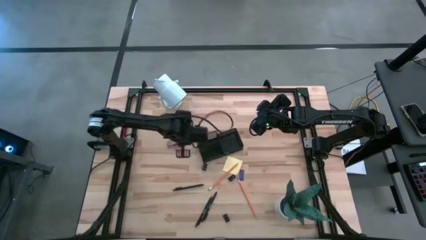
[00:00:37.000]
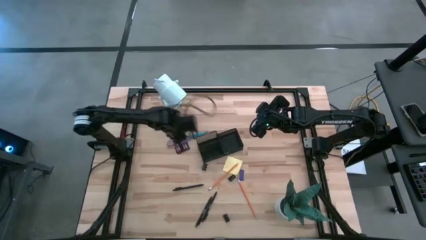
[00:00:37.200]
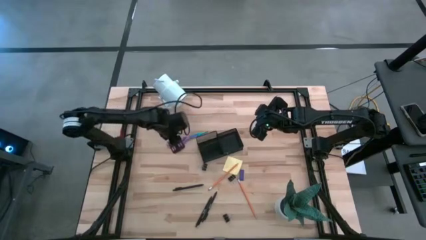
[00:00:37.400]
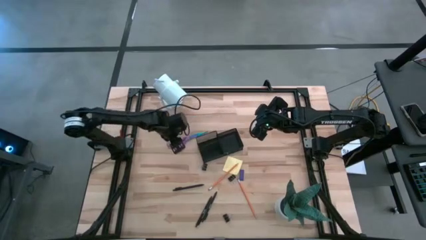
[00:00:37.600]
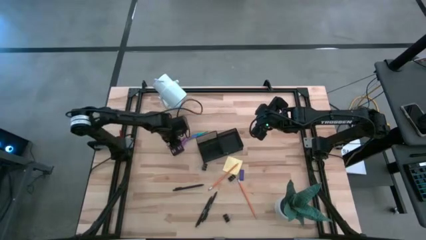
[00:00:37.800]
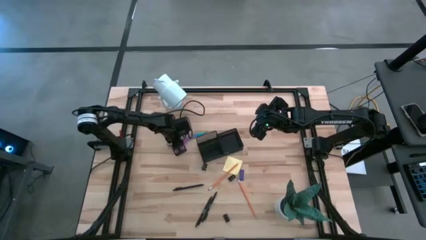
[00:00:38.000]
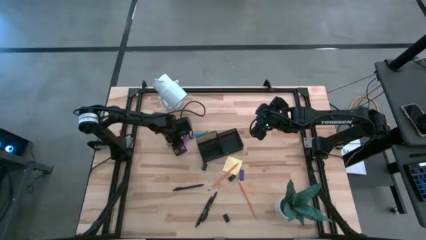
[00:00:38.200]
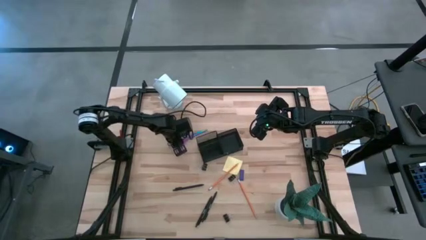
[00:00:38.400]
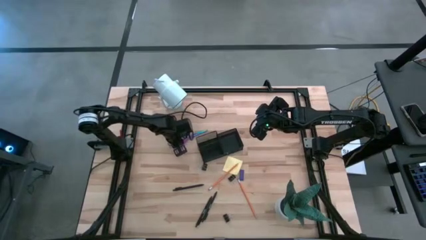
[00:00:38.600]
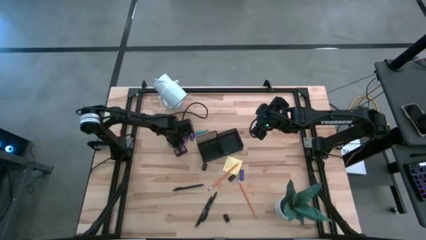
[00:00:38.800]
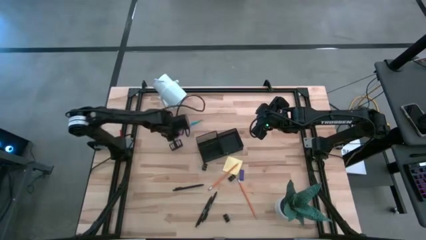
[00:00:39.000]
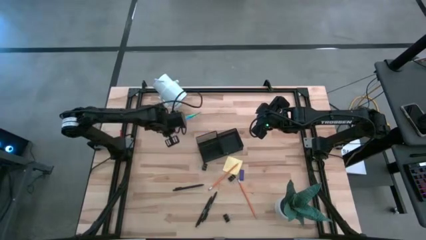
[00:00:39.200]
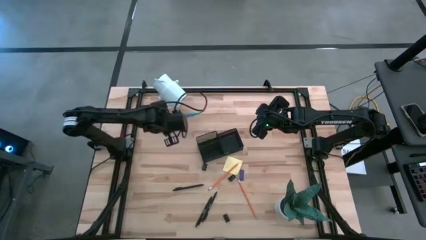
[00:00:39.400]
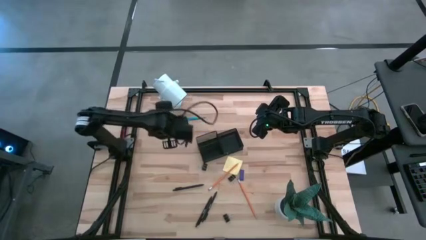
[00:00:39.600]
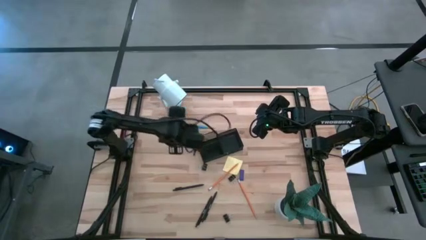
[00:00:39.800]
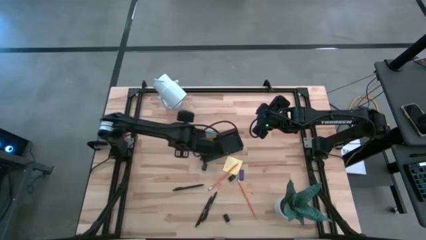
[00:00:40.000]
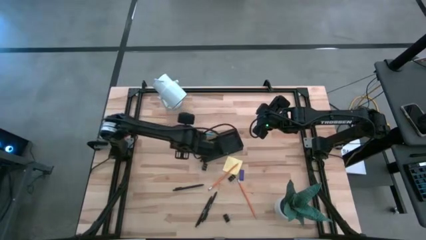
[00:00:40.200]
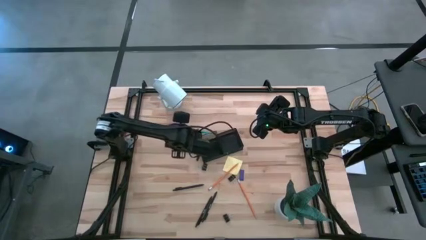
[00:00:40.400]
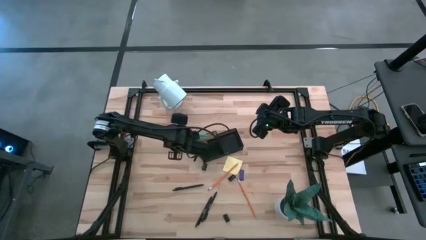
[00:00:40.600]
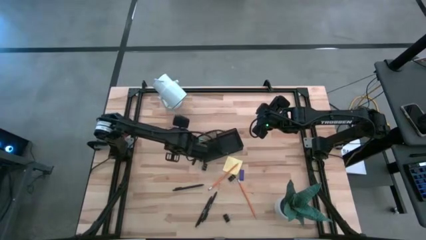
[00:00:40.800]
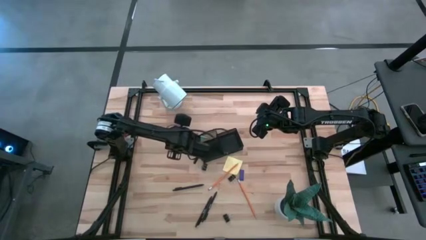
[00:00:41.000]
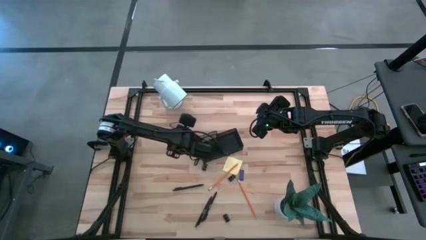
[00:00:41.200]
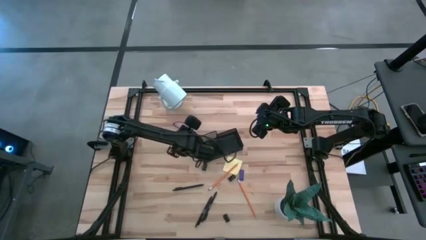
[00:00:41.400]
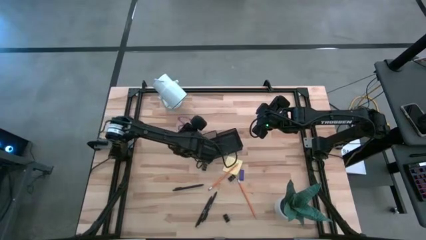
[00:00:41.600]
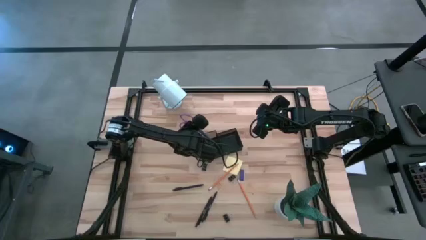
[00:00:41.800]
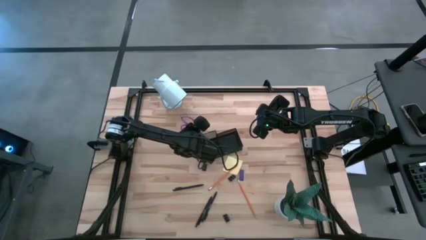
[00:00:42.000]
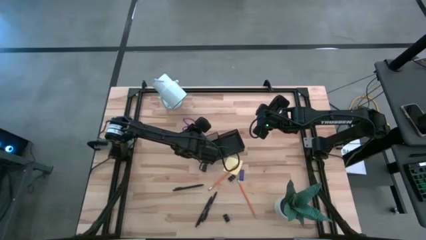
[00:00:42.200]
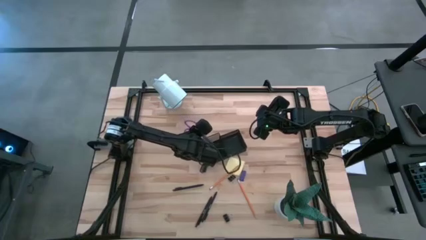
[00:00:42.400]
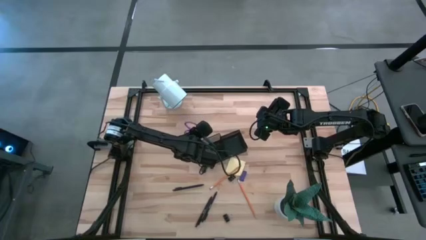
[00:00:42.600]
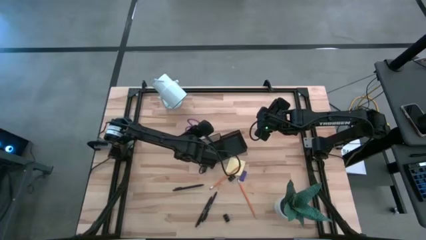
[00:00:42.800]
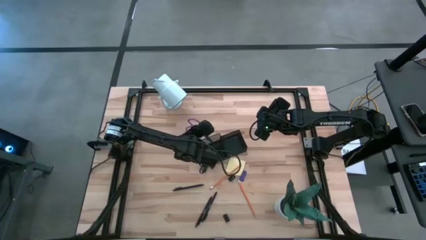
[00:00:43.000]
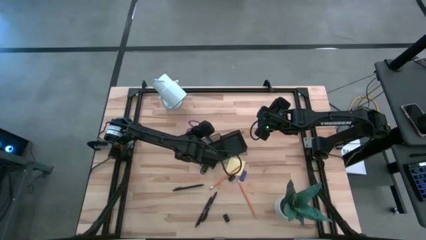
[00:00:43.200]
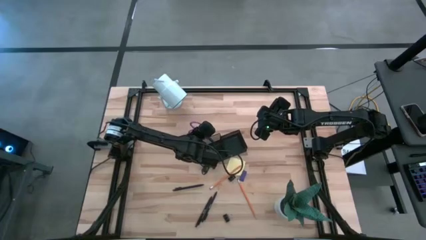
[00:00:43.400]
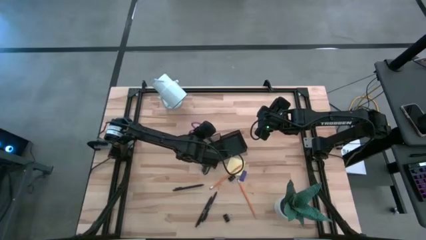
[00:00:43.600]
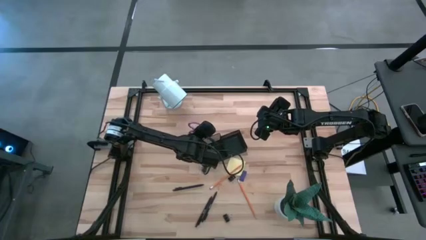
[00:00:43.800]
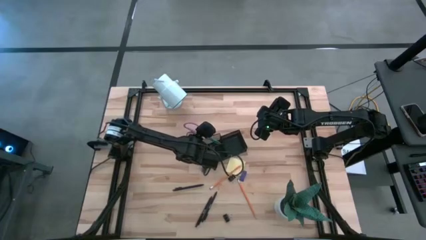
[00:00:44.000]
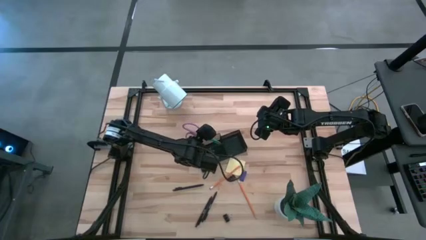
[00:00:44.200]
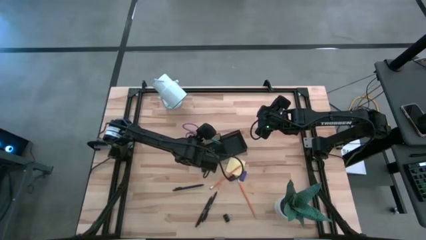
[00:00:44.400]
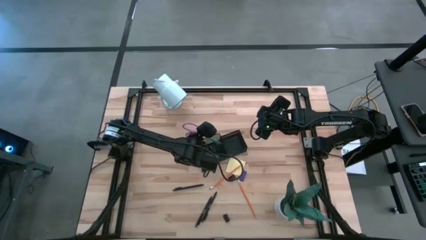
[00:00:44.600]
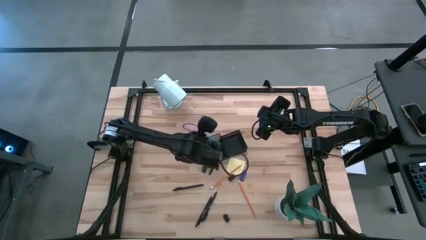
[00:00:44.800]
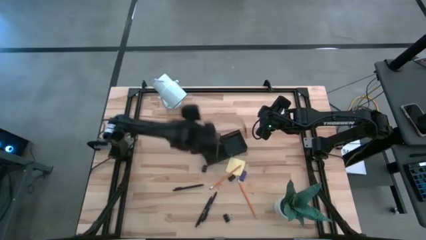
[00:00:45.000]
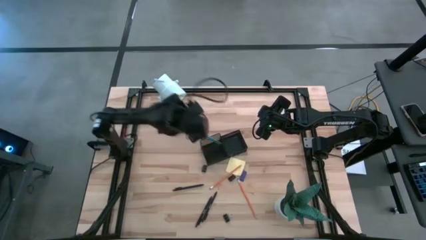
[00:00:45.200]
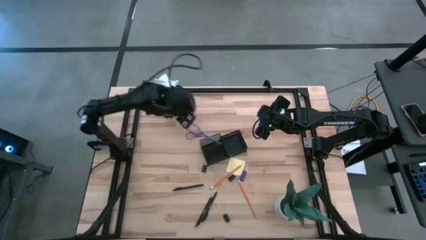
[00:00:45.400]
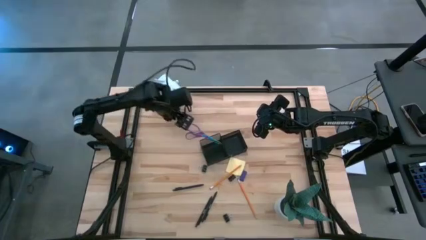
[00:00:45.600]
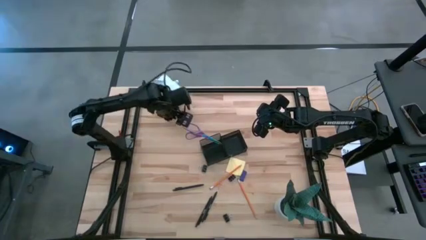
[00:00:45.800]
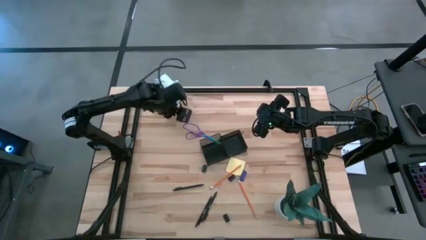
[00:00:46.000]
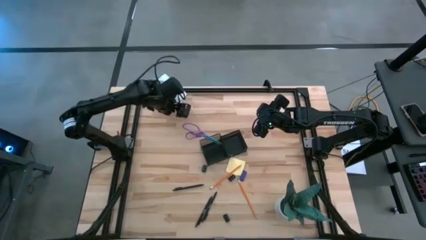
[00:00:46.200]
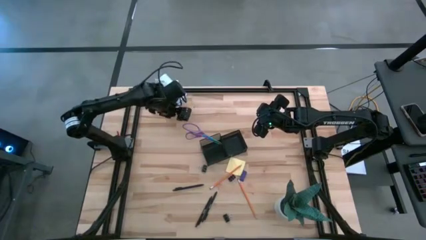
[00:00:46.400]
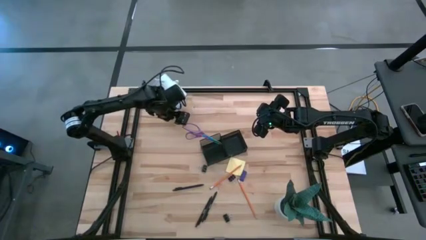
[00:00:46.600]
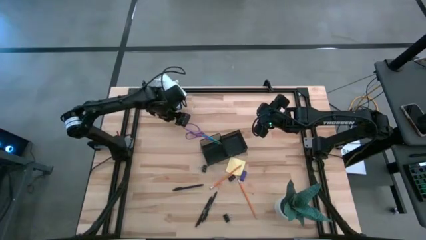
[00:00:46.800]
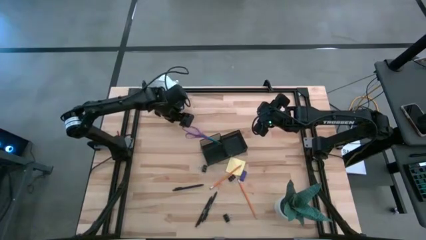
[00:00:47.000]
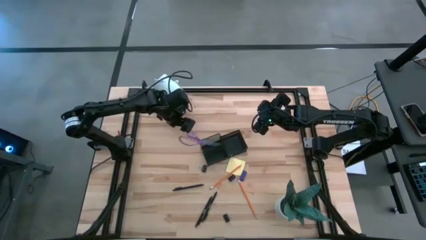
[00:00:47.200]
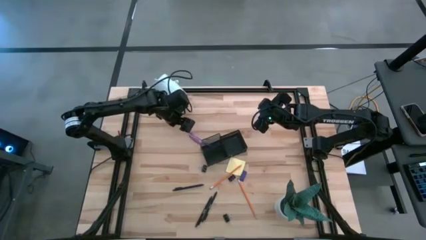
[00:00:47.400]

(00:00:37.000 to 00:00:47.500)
Task: Pick and place office supplies into organizer
Put the purple scissors into the black desk organizer

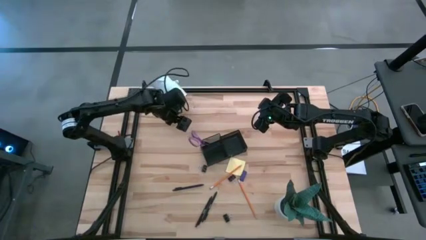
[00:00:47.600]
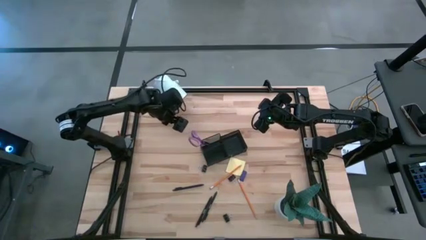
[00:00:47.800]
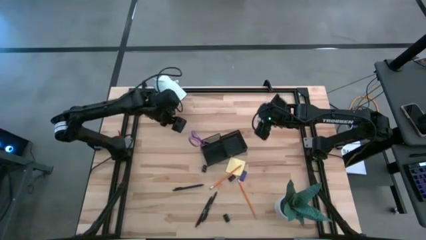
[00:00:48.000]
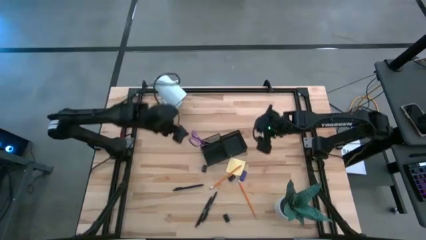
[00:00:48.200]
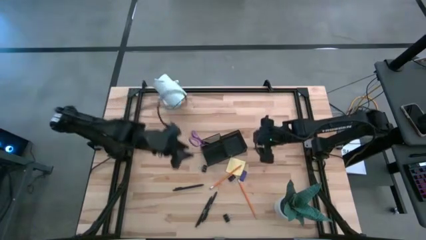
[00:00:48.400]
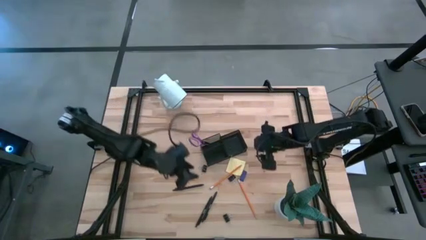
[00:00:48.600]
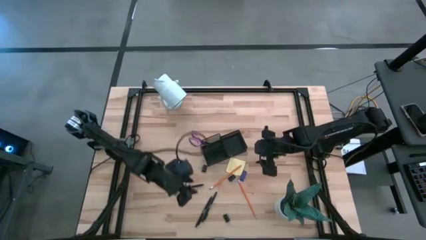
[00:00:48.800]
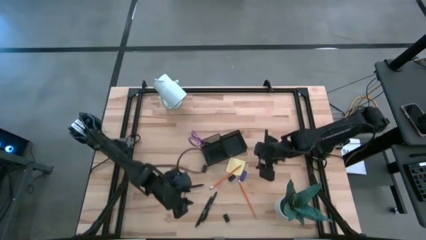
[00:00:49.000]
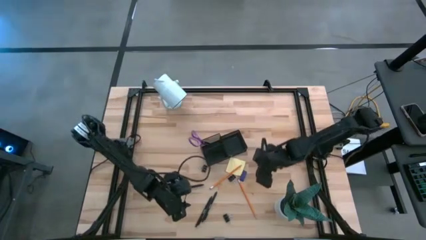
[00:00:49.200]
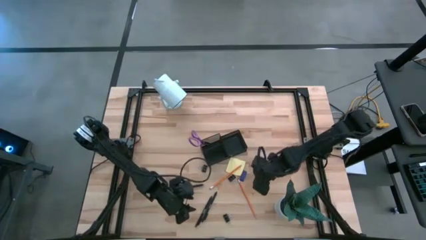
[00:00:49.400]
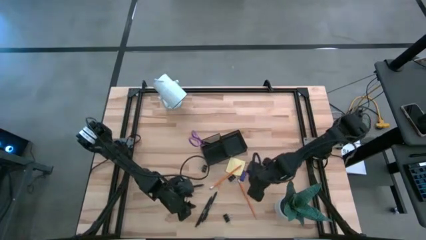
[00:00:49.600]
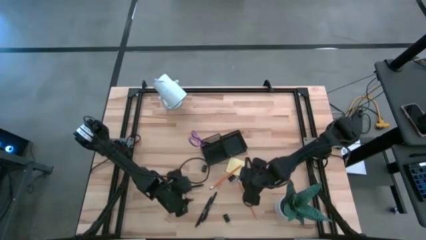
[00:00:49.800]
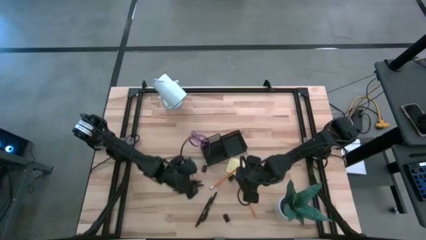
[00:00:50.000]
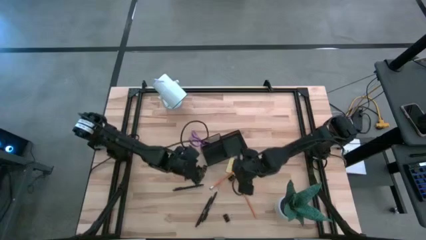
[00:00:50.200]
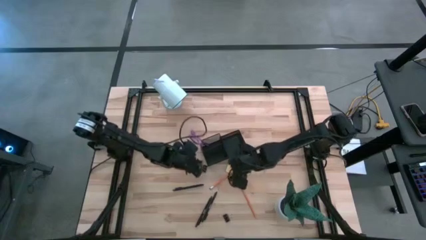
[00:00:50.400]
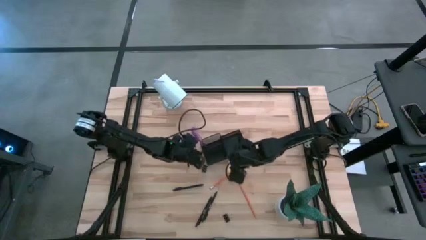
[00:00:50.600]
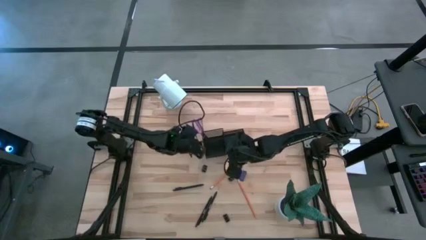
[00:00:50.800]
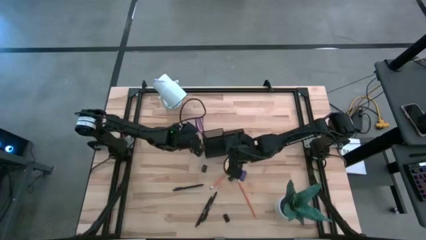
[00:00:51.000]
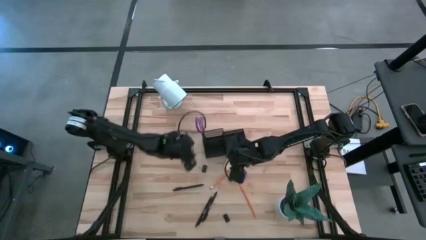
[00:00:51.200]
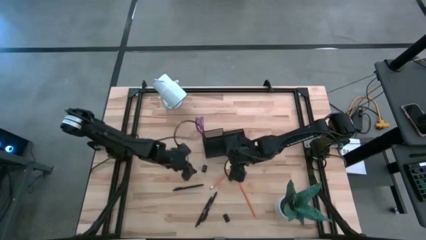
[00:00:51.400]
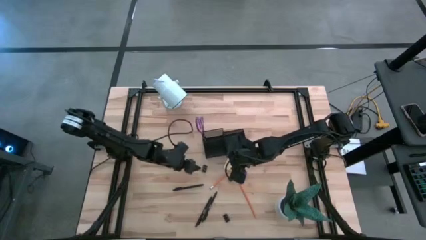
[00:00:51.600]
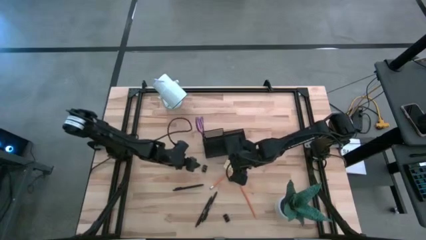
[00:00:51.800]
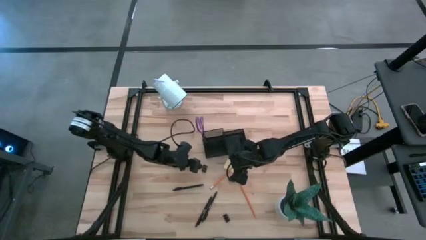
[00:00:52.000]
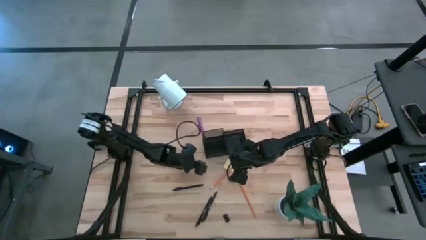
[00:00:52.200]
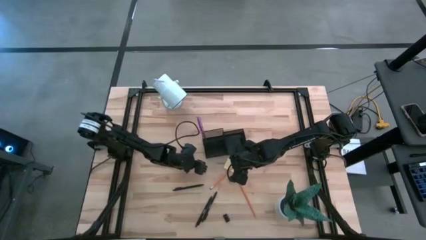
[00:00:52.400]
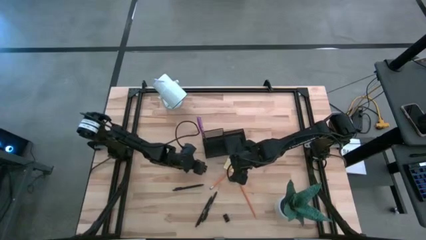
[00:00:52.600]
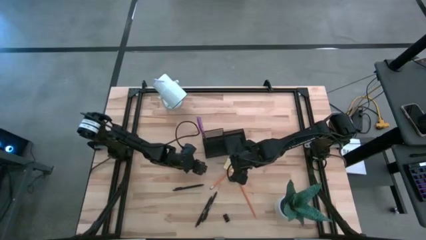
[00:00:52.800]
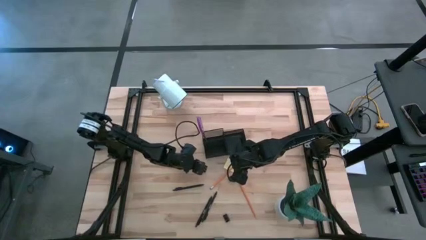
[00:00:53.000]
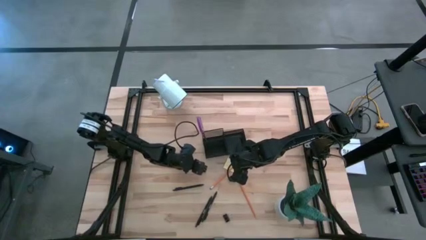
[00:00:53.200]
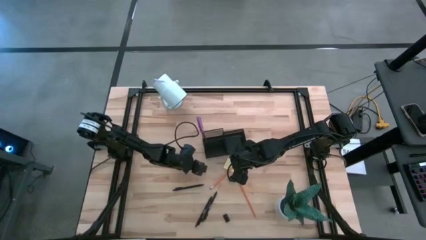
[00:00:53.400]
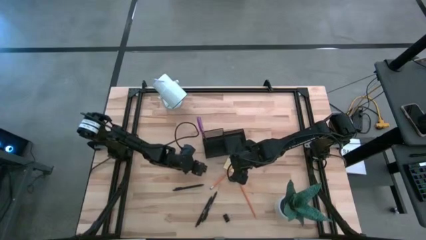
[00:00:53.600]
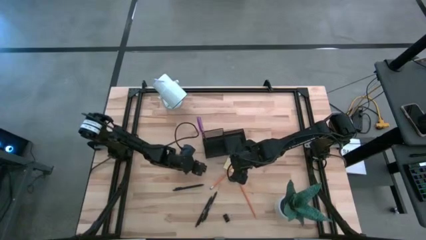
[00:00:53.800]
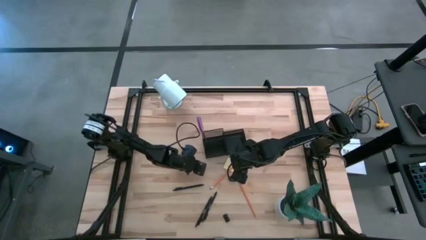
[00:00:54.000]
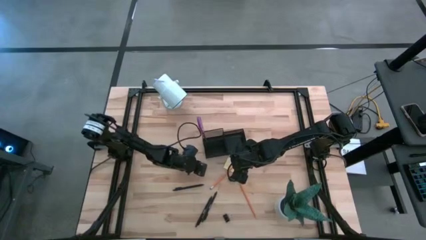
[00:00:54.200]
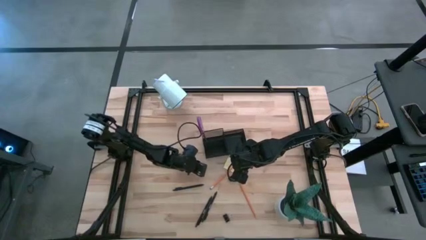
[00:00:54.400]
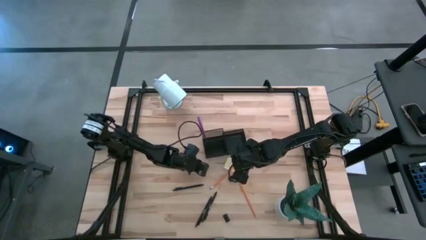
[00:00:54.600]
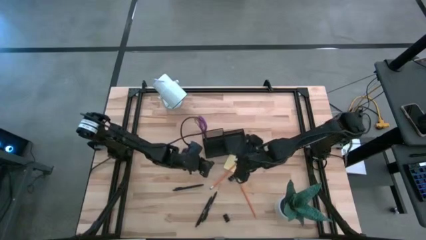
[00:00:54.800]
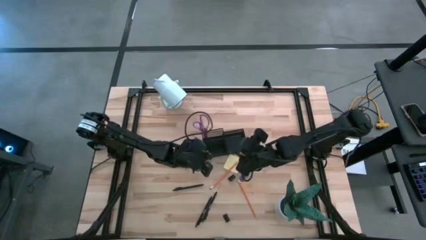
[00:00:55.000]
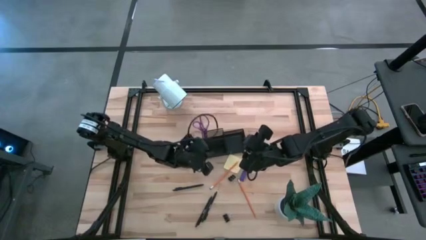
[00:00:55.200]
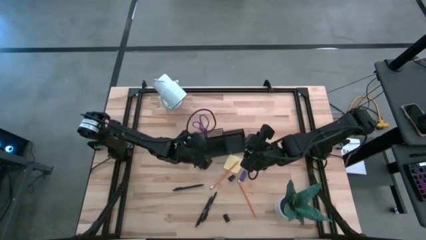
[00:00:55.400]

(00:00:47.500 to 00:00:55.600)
Put the top left black binder clip into the black desk organizer
